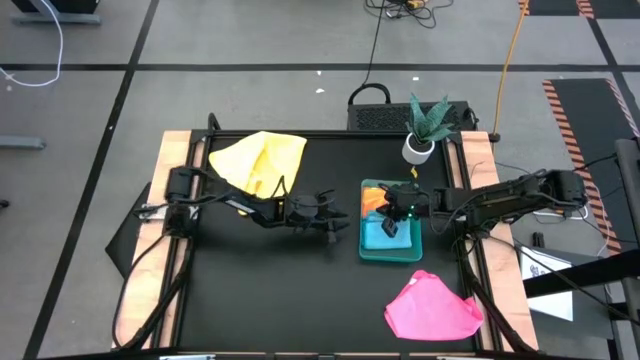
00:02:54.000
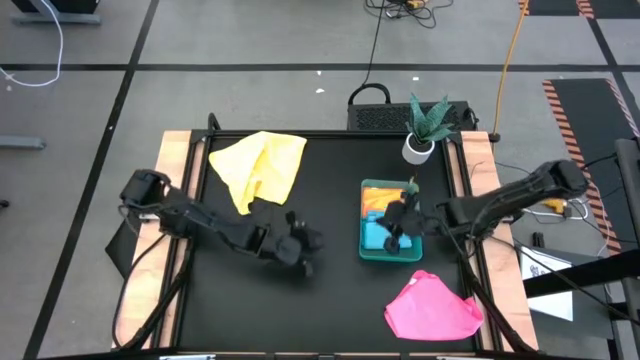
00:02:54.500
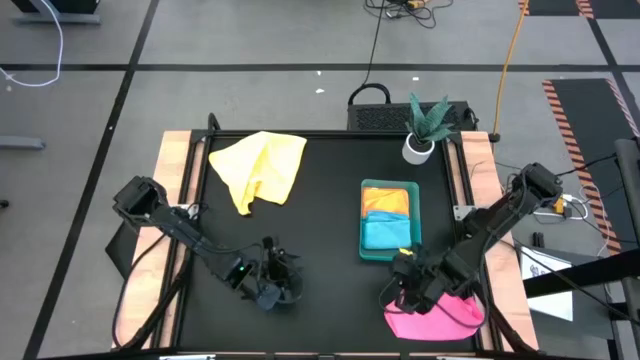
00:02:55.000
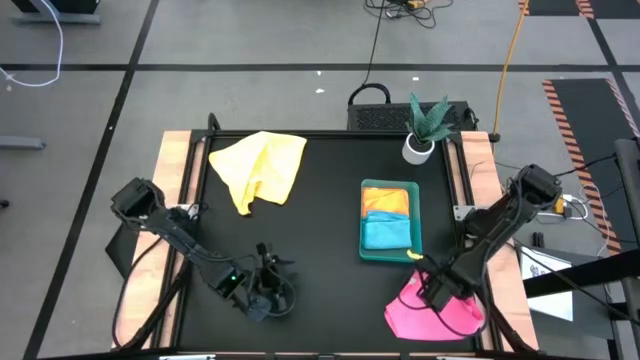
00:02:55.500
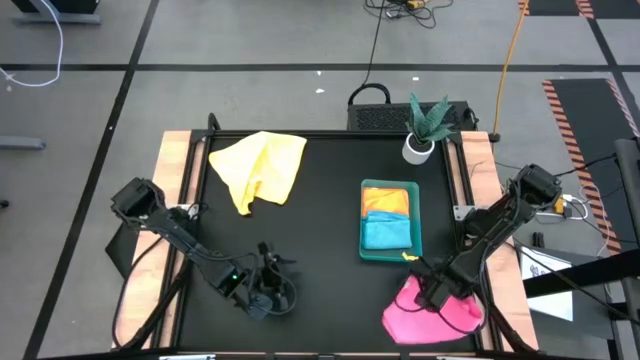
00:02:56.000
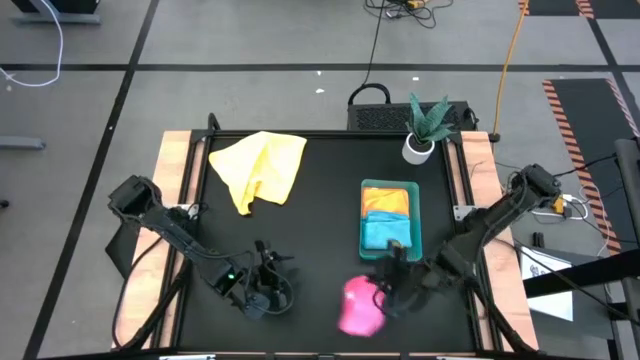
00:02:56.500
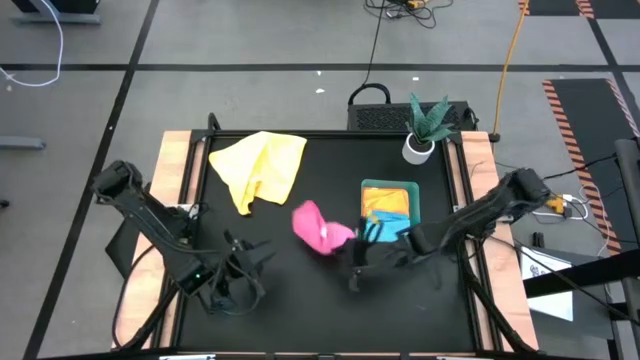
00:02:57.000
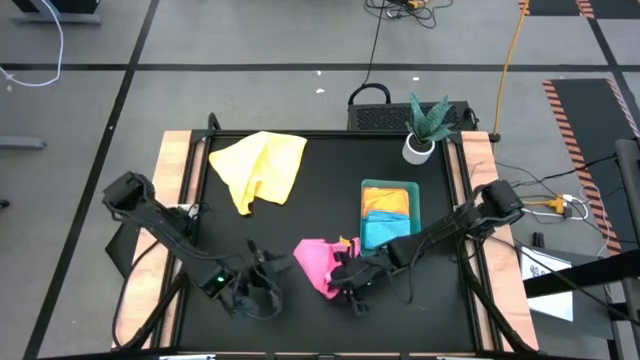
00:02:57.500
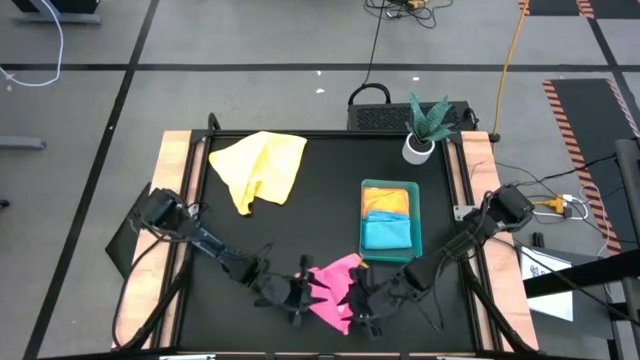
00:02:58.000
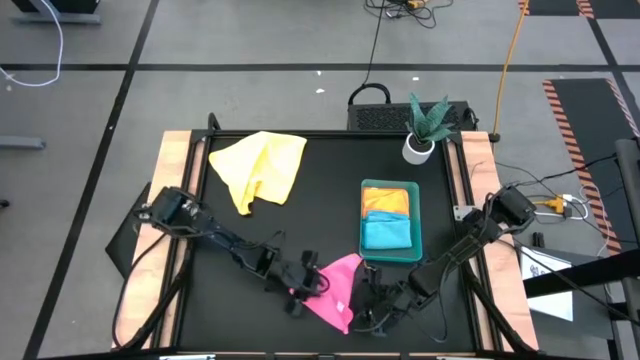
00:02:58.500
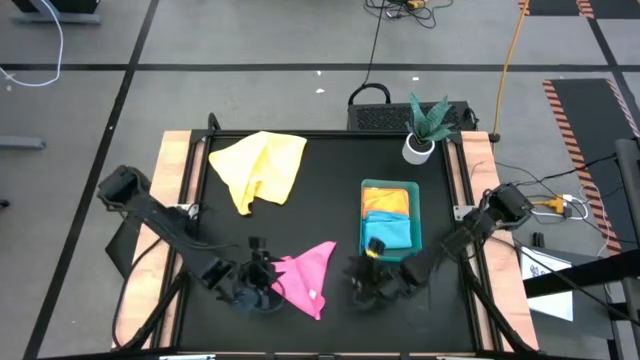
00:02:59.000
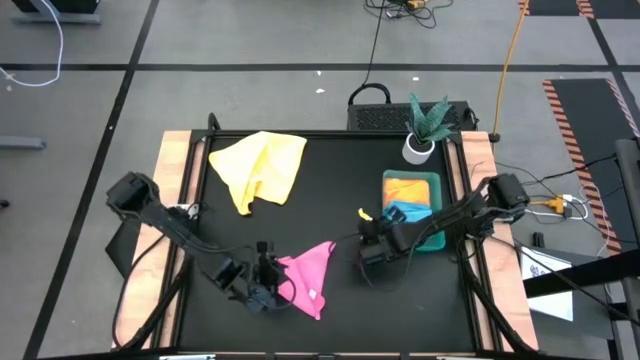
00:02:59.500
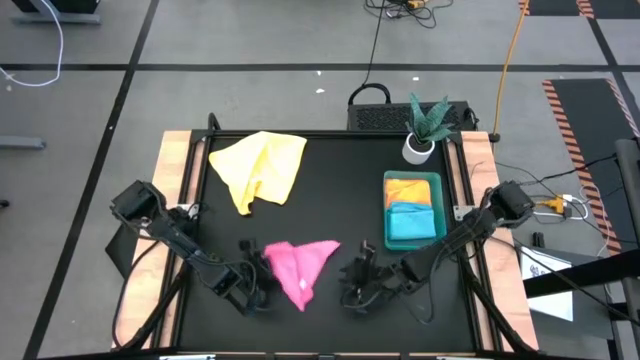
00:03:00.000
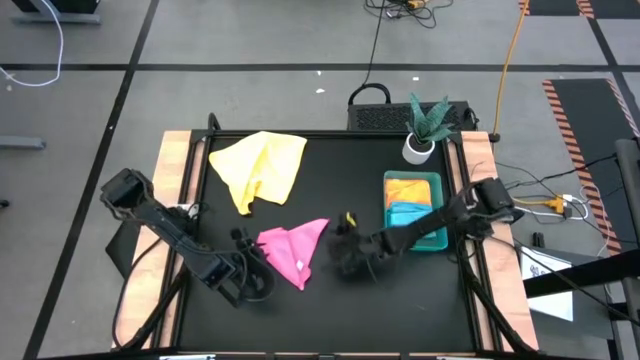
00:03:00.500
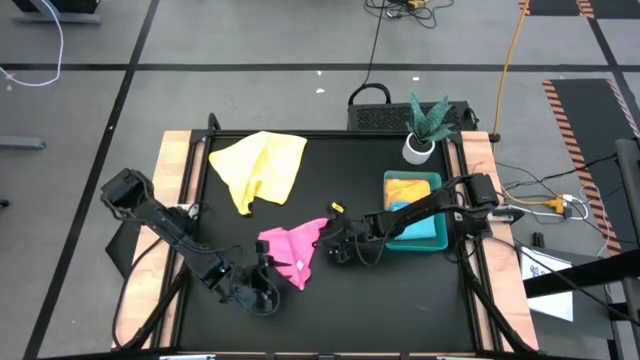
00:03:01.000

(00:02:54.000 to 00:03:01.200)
Task: Fold microfiber towels
Fold the pink microfiber cloth

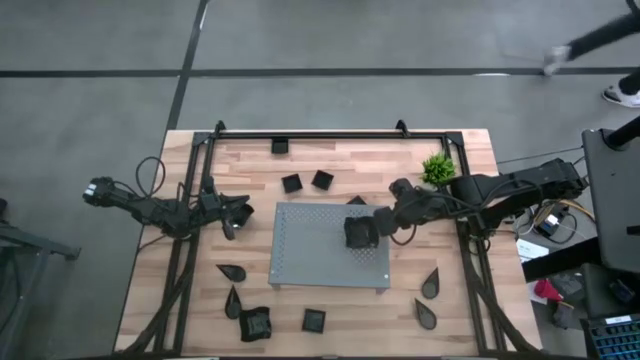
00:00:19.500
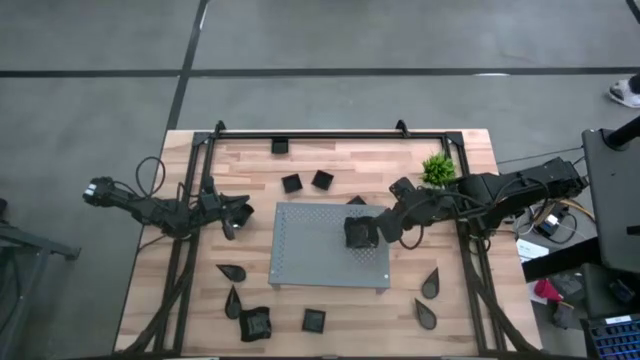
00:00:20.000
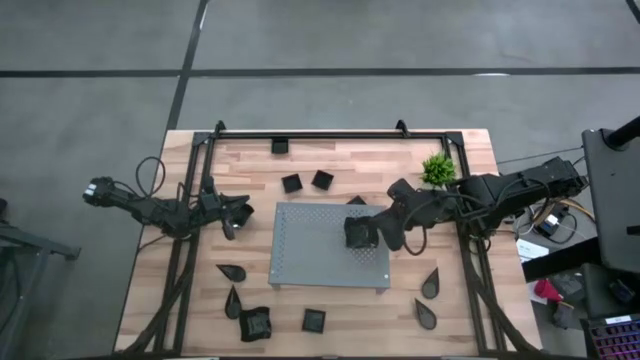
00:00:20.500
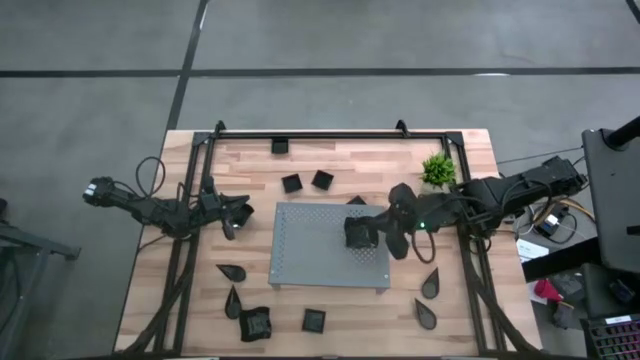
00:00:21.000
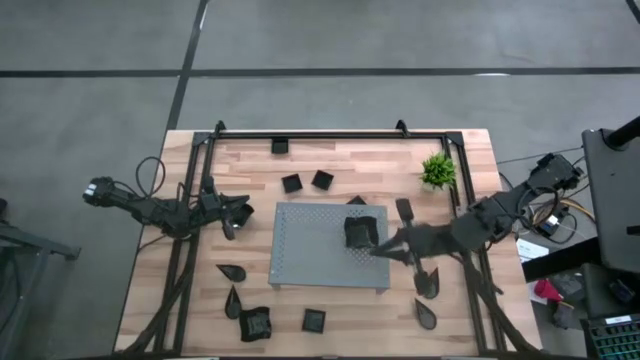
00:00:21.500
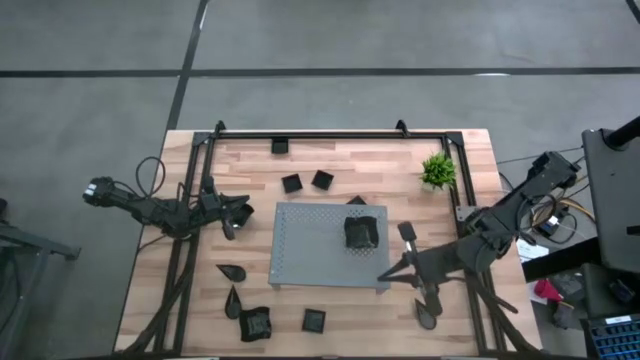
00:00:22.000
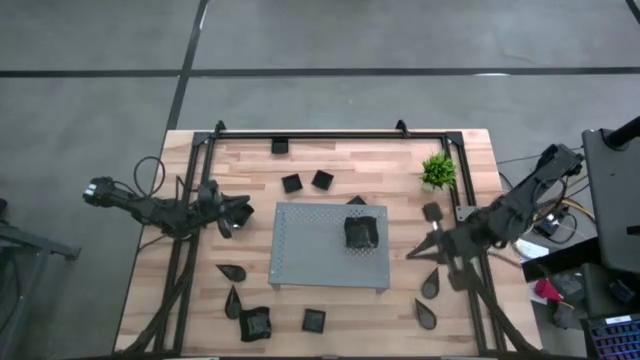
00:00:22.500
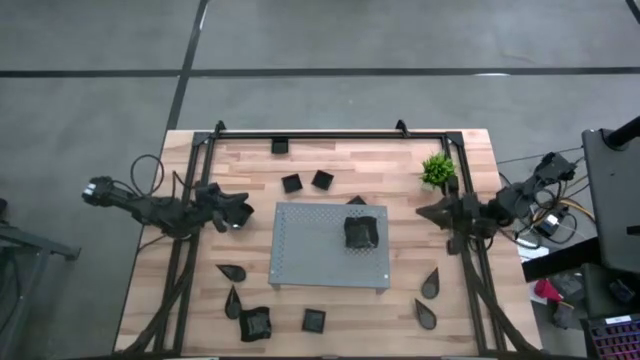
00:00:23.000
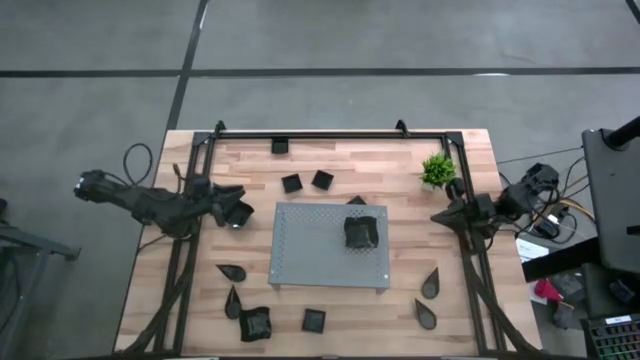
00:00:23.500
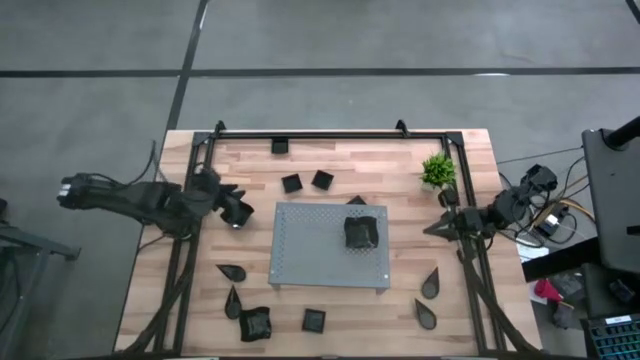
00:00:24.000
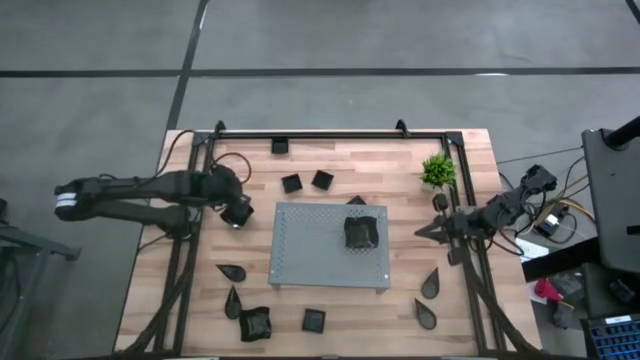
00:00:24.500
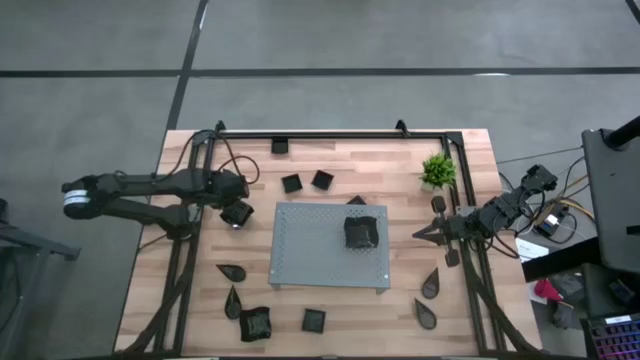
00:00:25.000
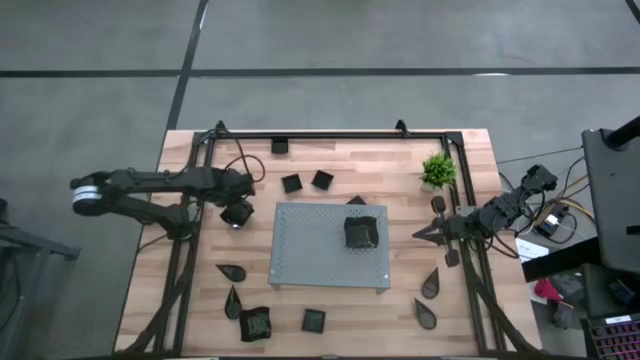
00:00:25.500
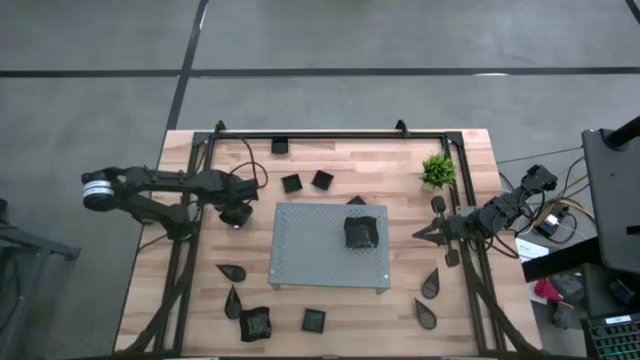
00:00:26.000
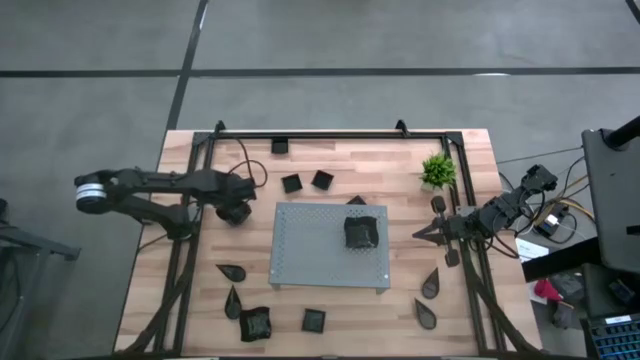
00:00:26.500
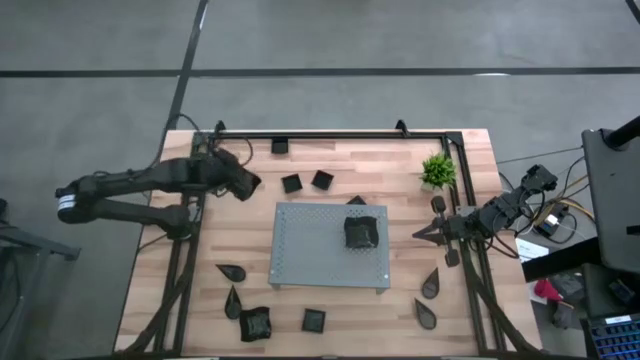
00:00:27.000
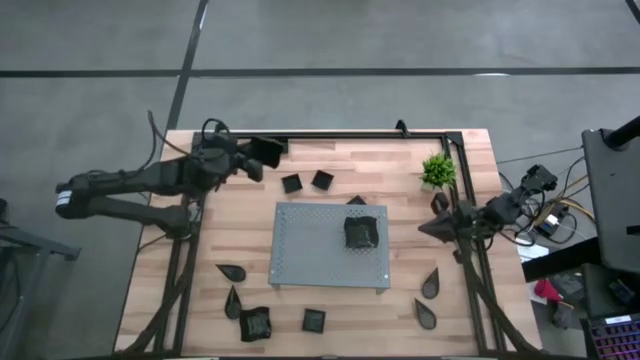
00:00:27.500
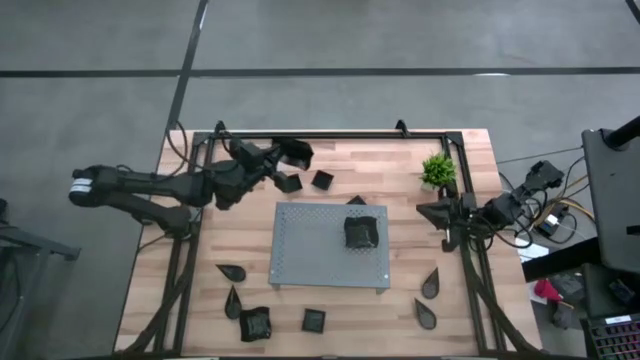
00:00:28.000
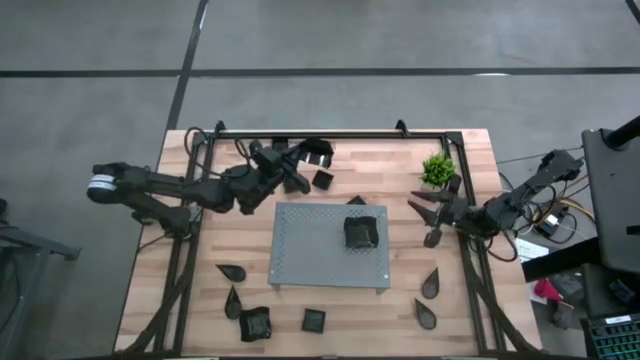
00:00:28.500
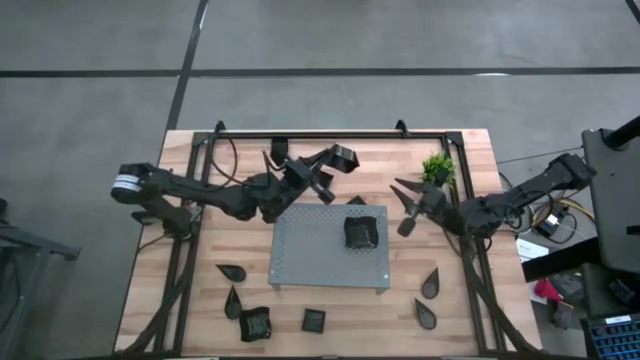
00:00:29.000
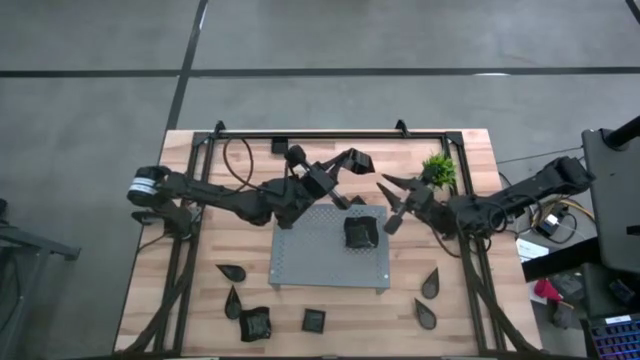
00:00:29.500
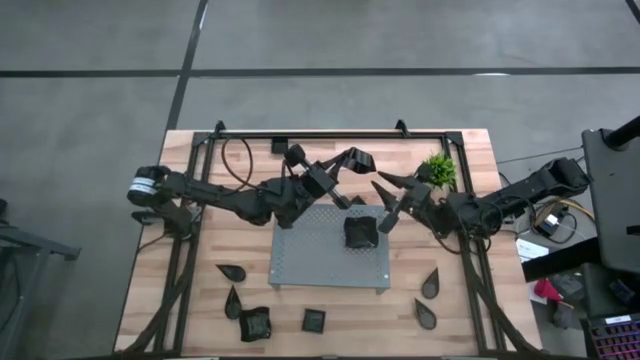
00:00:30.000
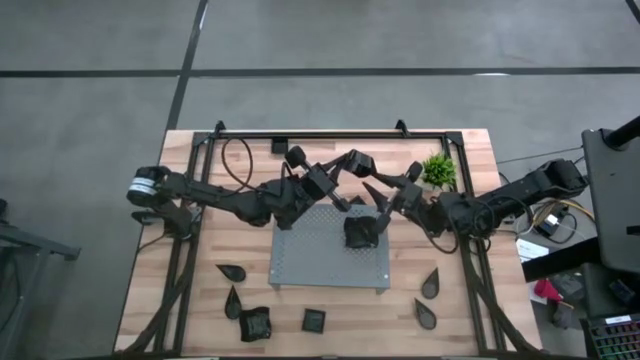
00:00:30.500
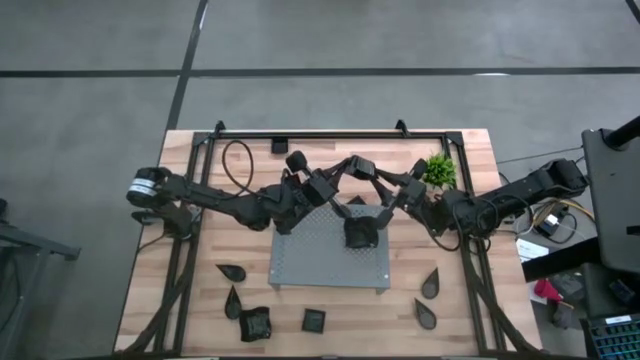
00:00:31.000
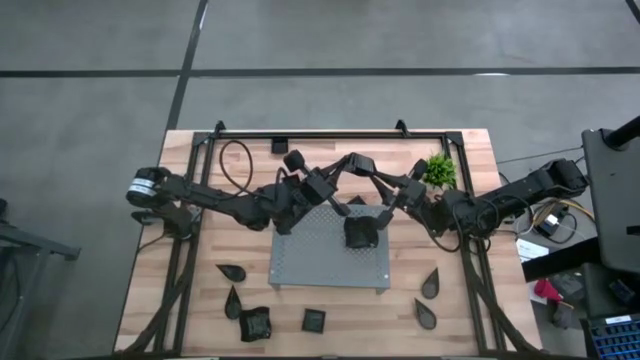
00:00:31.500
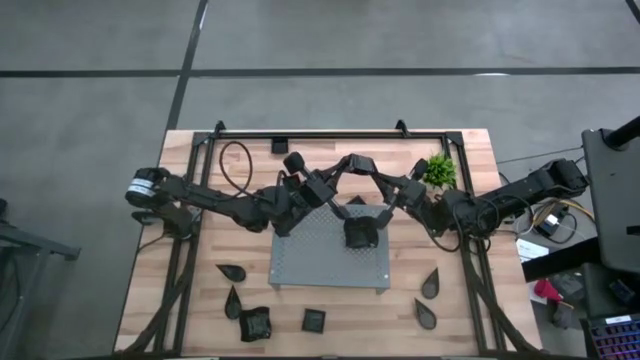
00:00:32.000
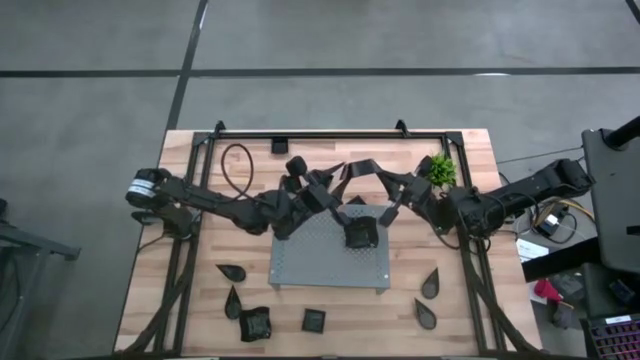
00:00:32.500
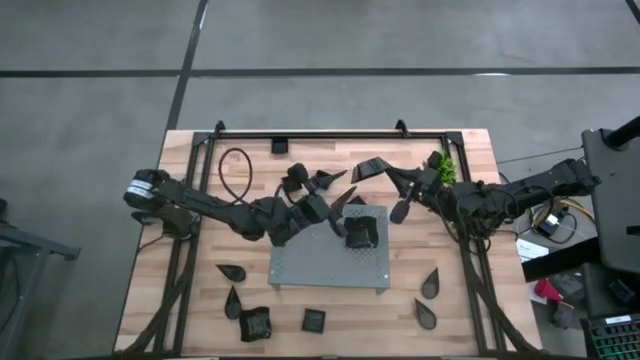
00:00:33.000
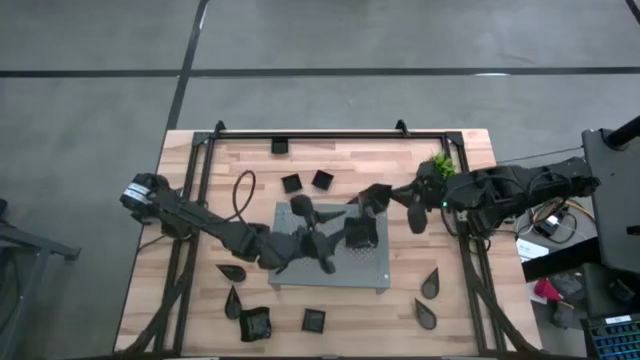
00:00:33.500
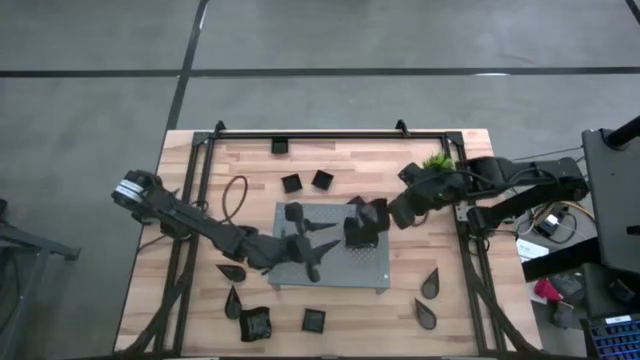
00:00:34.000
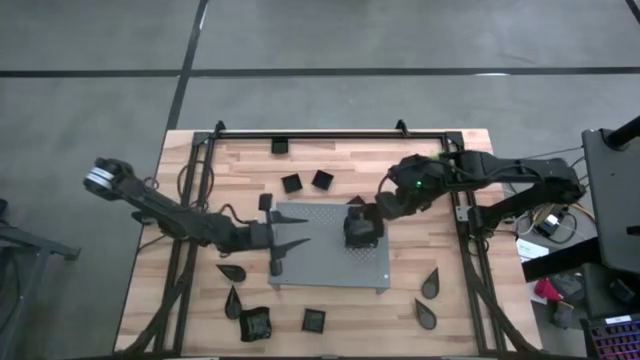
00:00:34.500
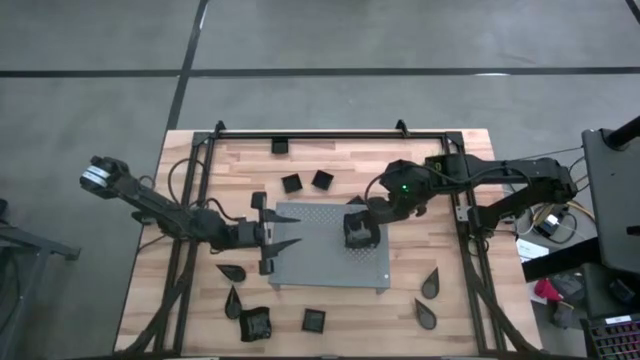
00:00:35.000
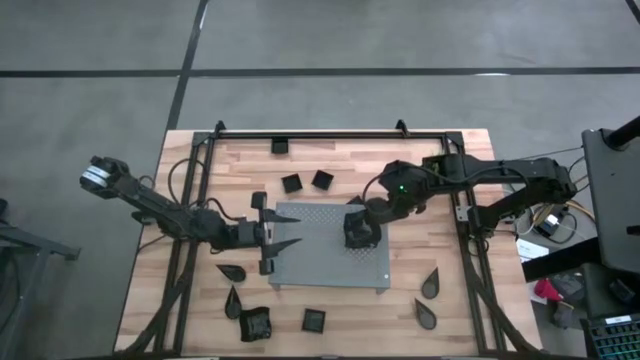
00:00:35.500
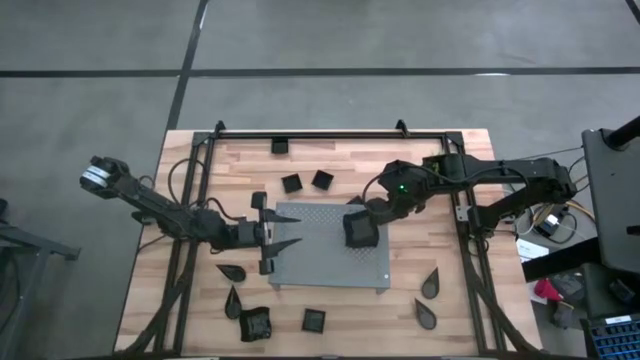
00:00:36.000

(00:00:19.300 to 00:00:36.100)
Task: Pick & Place Mini shaped plates
Stack the top black distorted square plate on top of the black distorted square plate on the shelf
